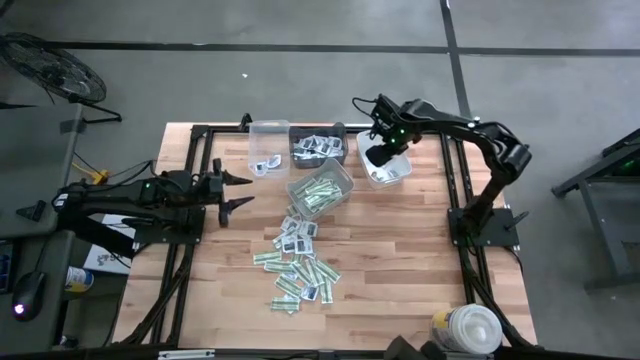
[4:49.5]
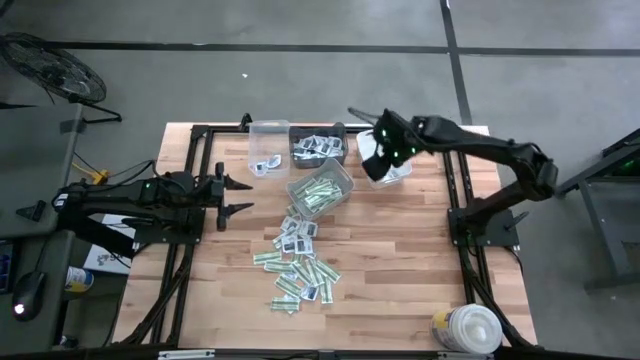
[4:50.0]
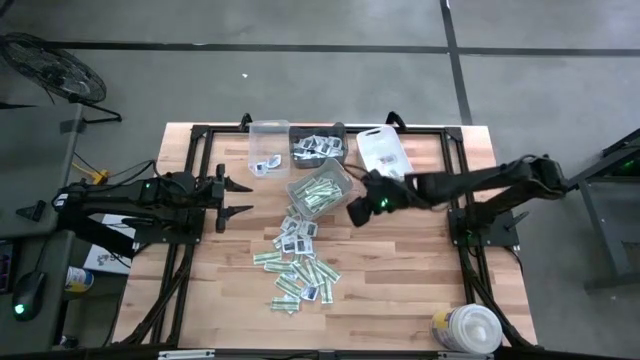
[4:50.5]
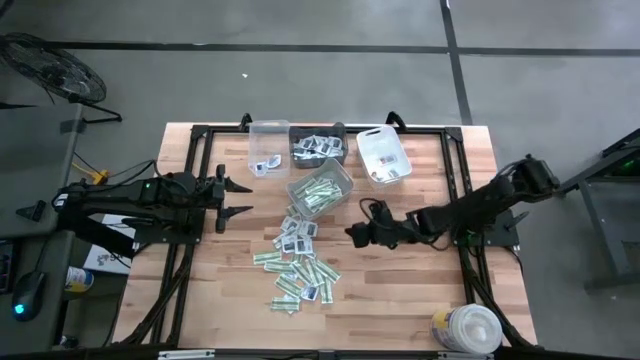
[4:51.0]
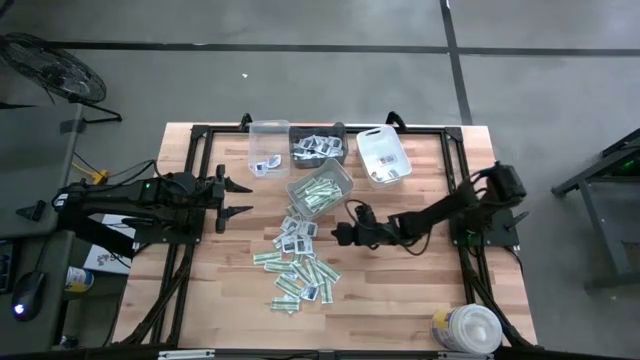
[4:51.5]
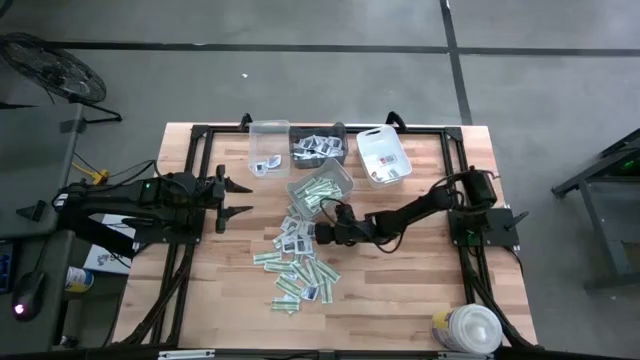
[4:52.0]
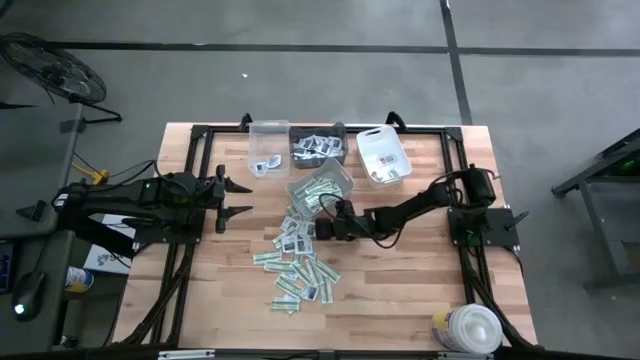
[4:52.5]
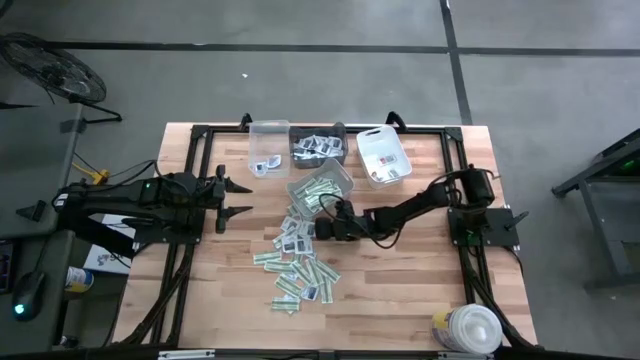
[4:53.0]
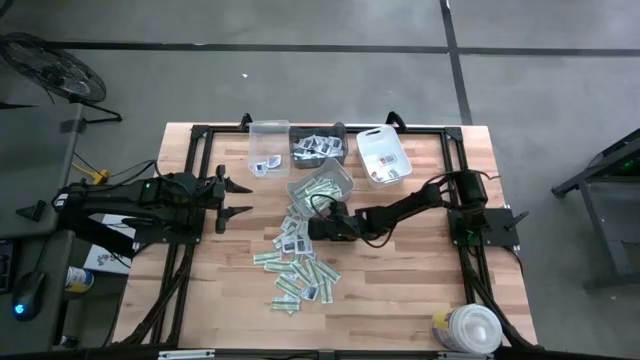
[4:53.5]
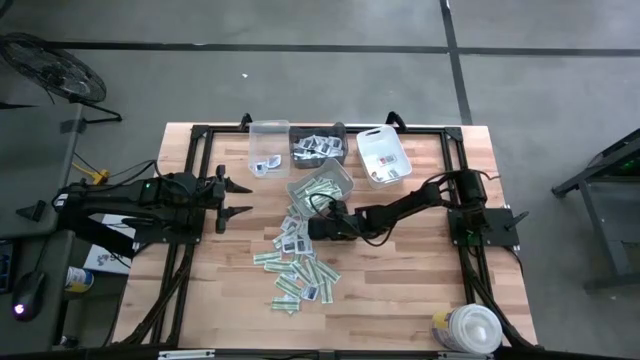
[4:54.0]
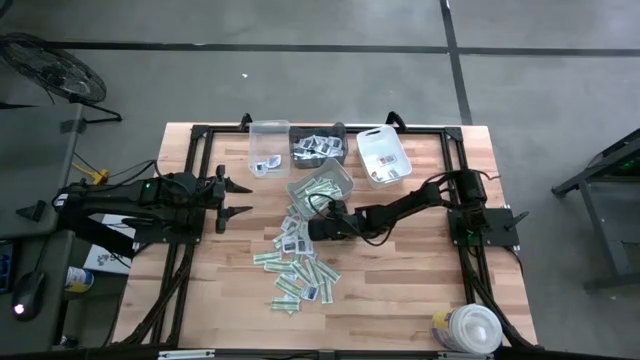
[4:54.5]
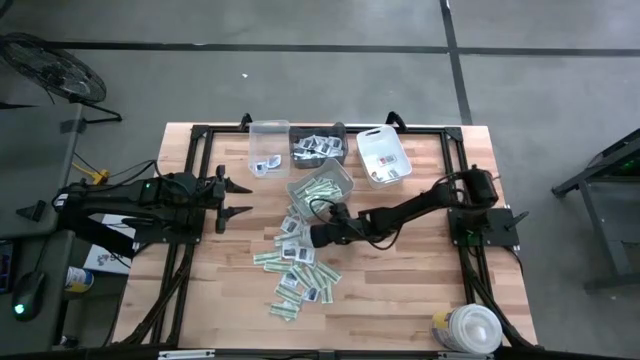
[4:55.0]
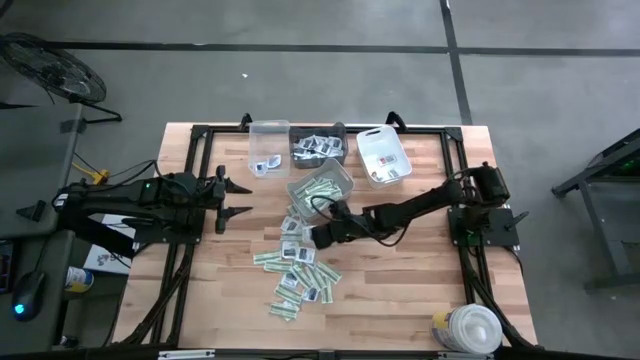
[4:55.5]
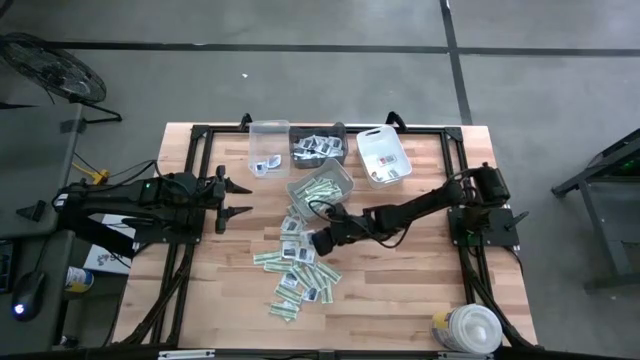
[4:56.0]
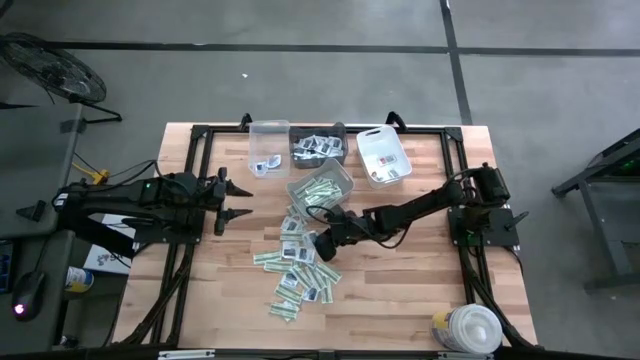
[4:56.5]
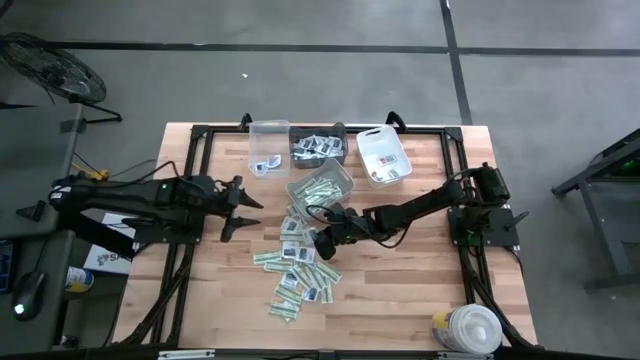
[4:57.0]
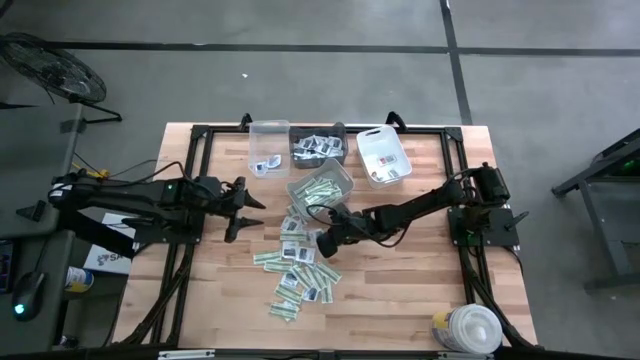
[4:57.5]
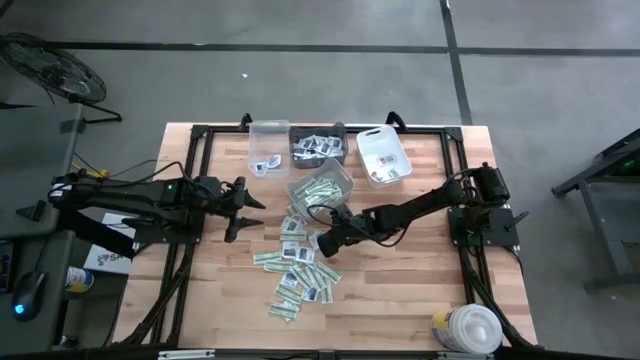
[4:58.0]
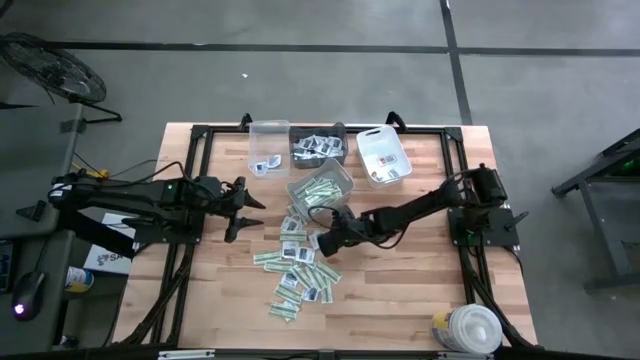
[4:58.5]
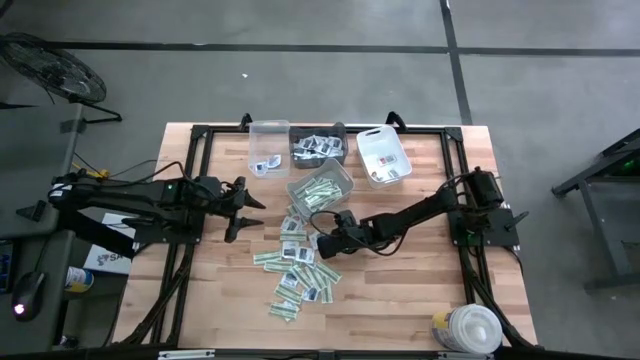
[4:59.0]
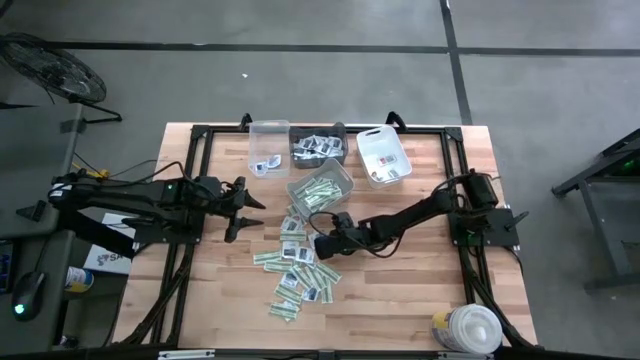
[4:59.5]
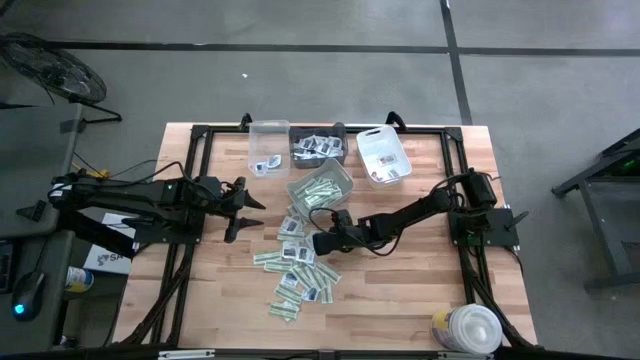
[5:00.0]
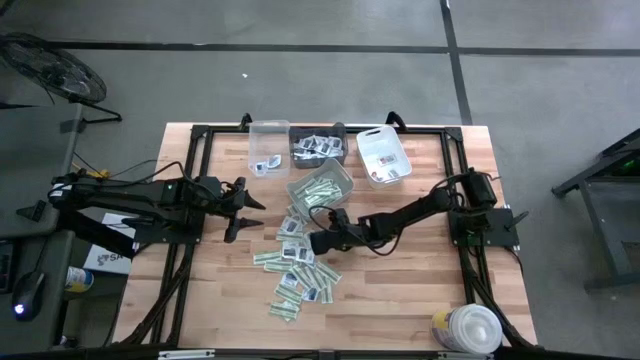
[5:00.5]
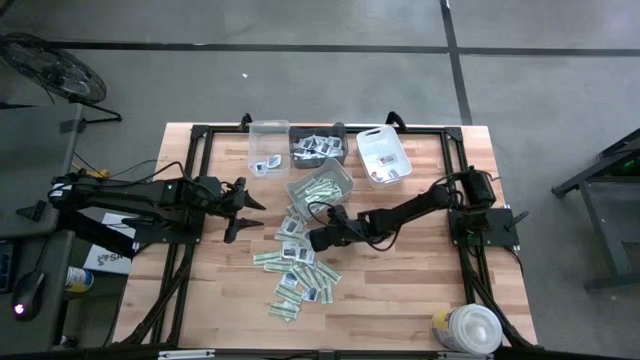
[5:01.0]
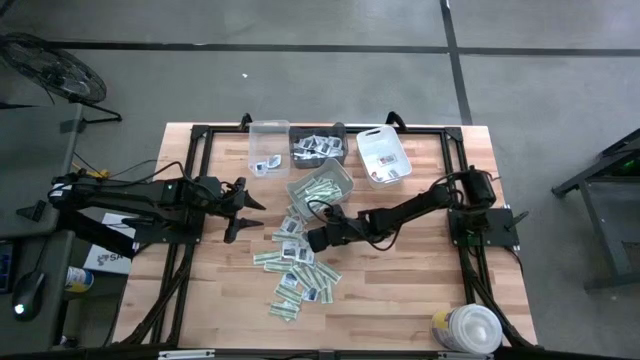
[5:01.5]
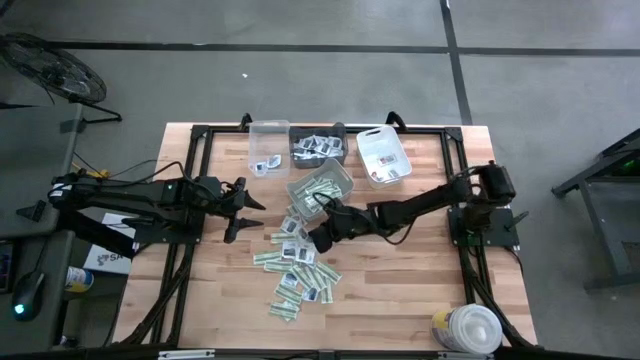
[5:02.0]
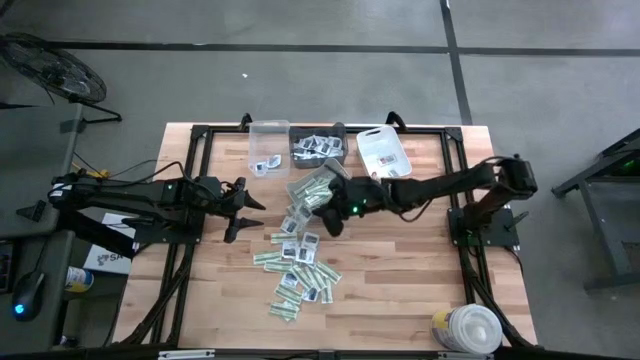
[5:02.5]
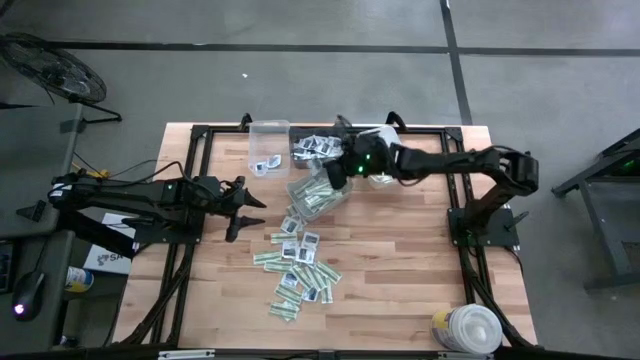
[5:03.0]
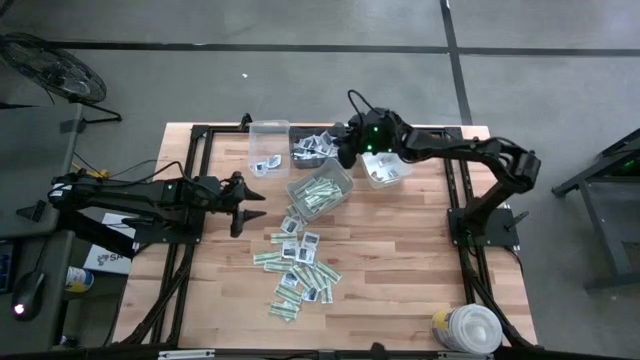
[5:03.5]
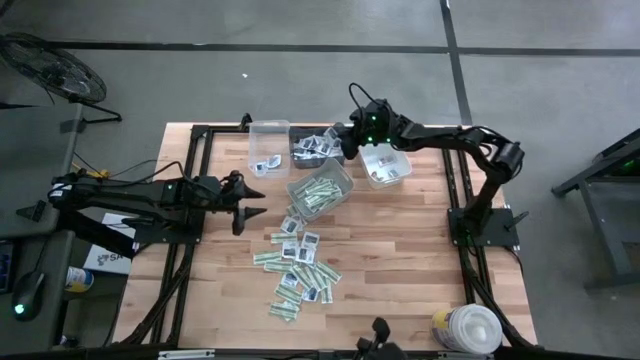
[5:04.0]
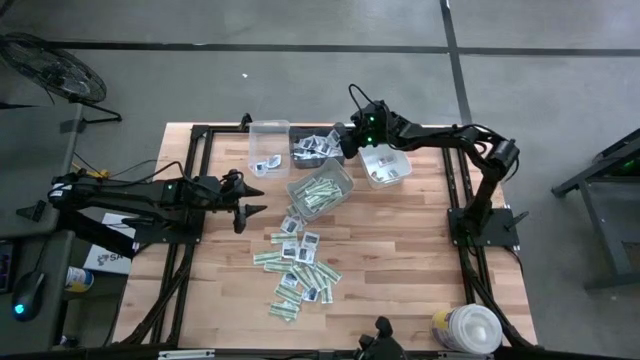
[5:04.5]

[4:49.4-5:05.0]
Task: Pick & Place First Aid Supplies
Put the towelette pack into the black bin

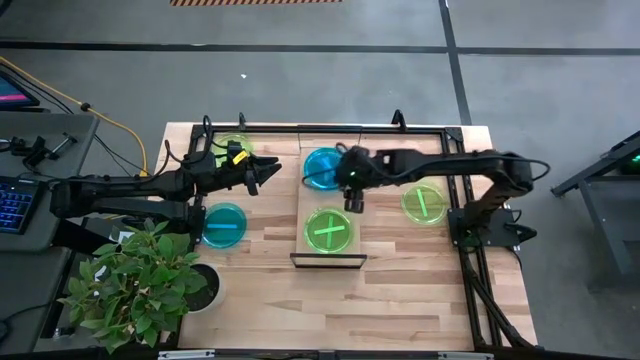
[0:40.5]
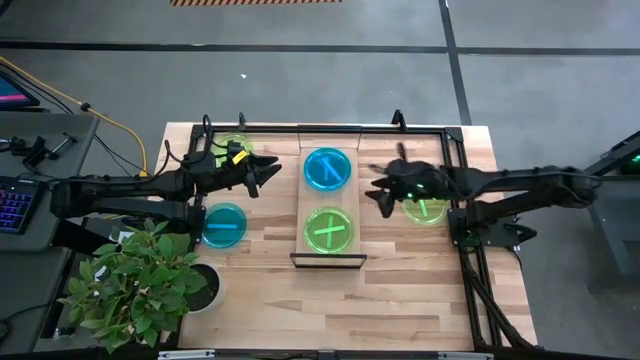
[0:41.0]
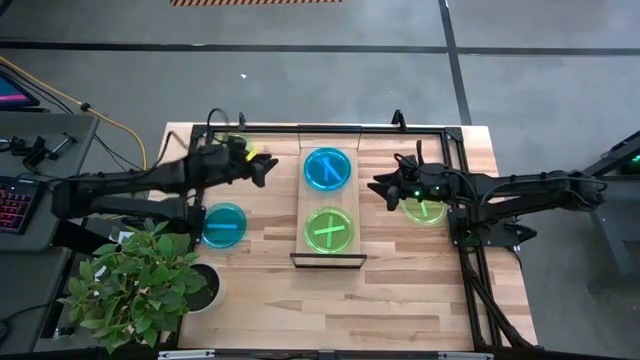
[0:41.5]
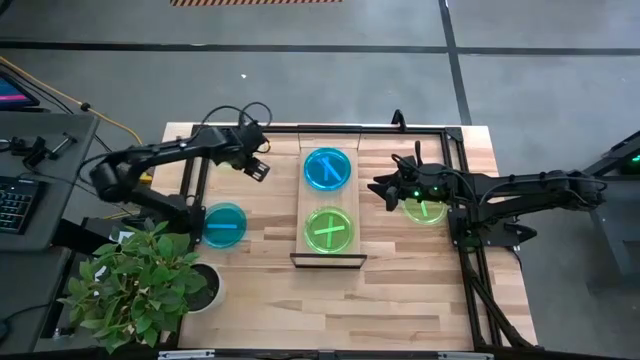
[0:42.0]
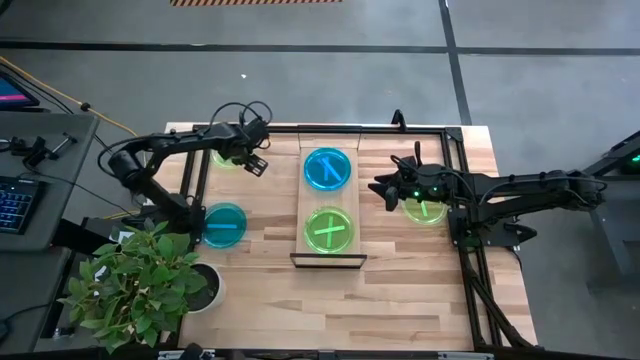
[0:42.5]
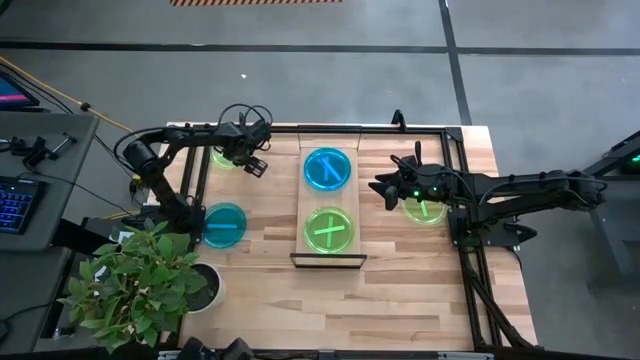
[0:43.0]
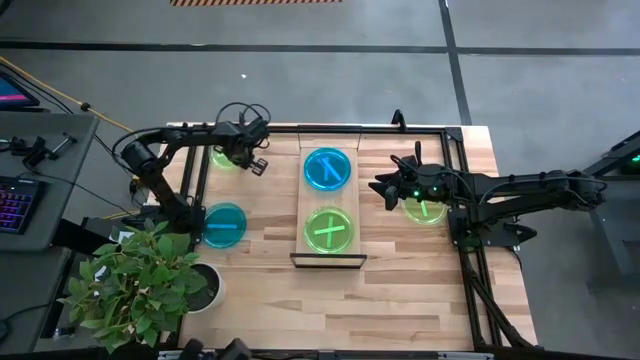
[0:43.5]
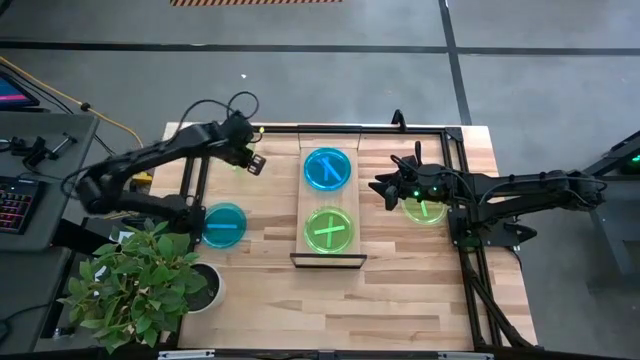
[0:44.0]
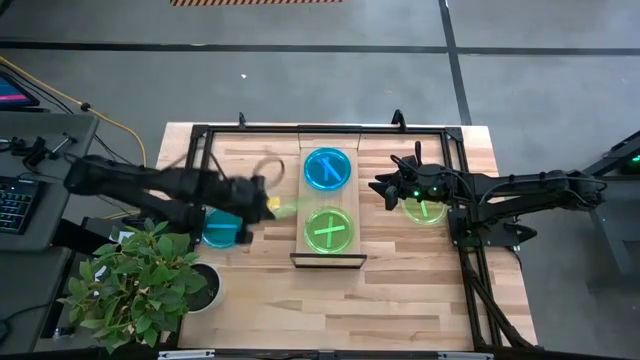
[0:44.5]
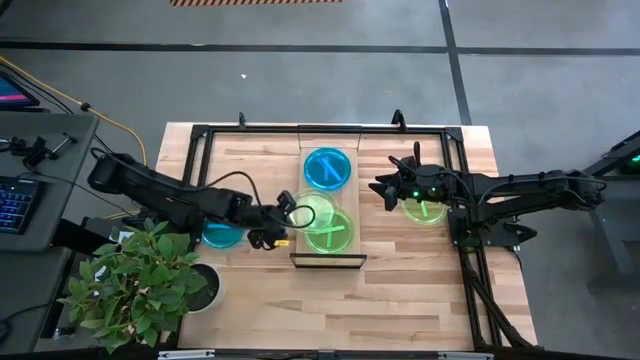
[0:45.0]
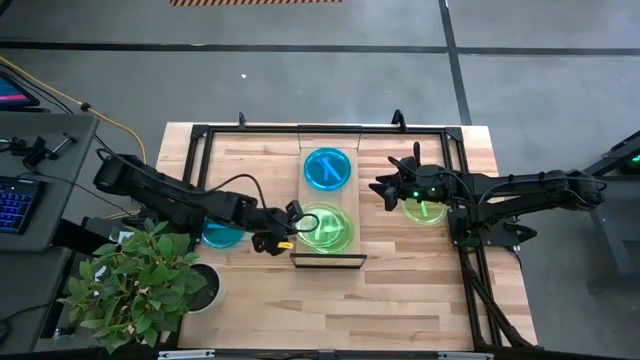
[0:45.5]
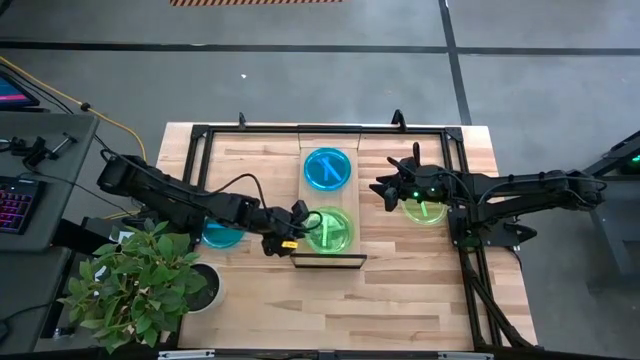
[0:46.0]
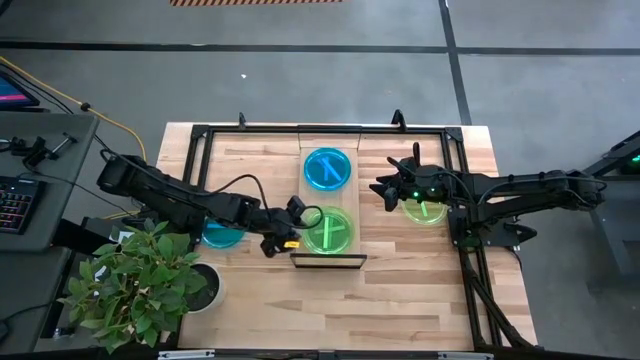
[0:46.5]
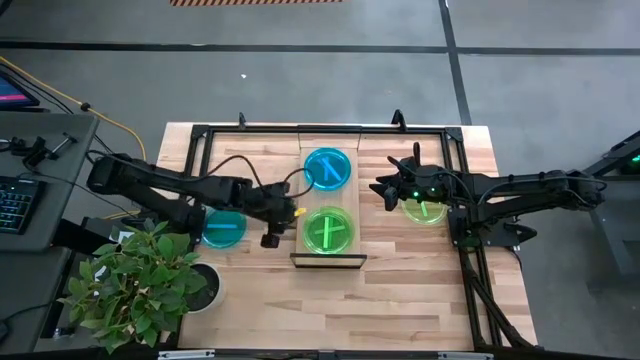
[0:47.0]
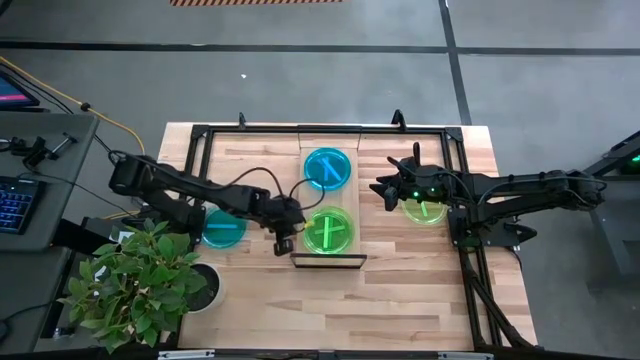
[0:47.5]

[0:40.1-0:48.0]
Task: Place and stack plates onto a shelf
Stack the green plate on top of the green plate on the shelf
